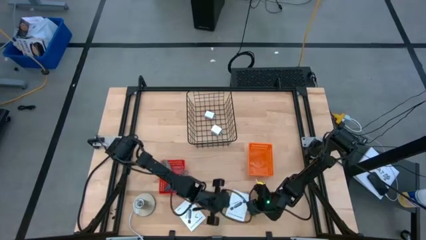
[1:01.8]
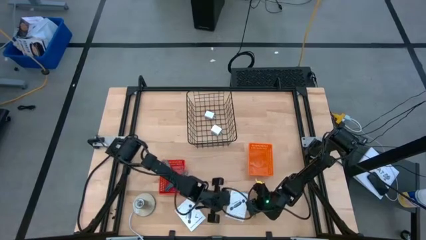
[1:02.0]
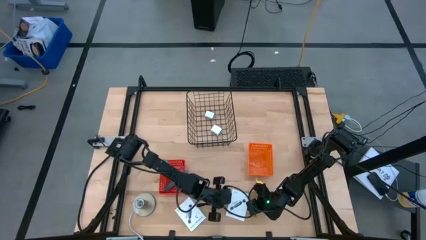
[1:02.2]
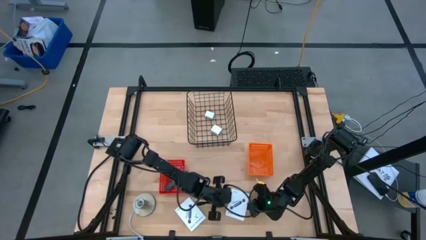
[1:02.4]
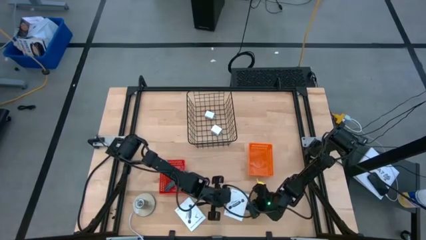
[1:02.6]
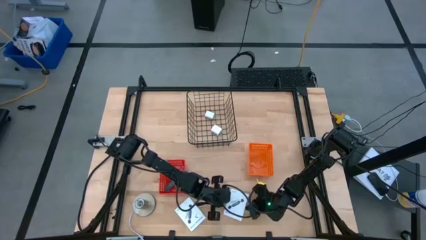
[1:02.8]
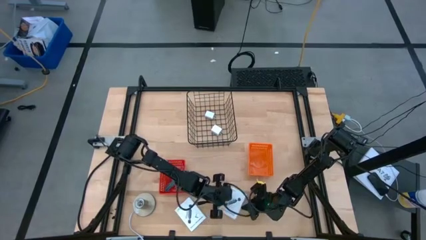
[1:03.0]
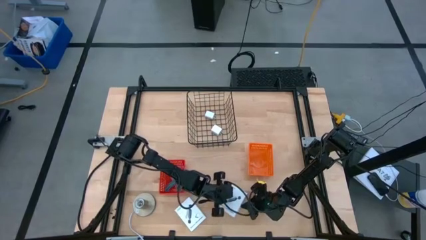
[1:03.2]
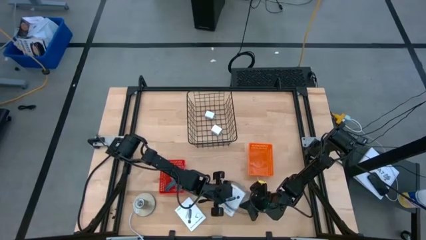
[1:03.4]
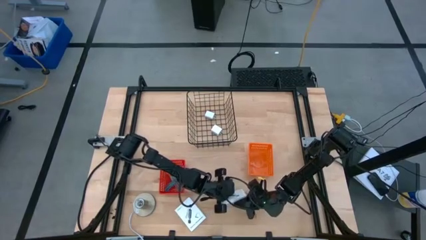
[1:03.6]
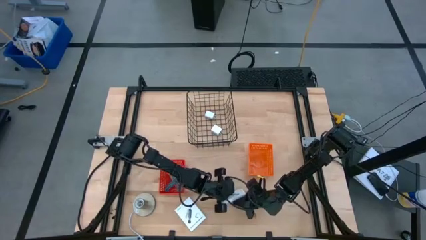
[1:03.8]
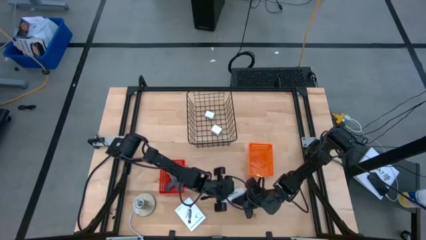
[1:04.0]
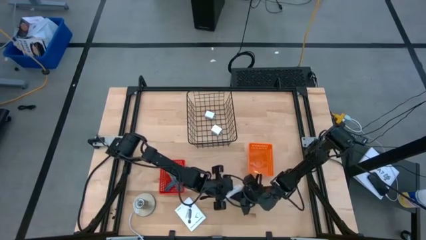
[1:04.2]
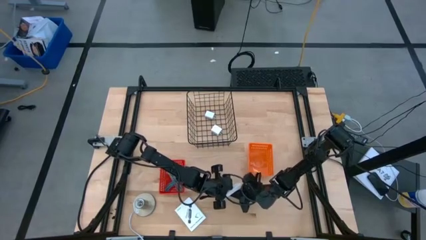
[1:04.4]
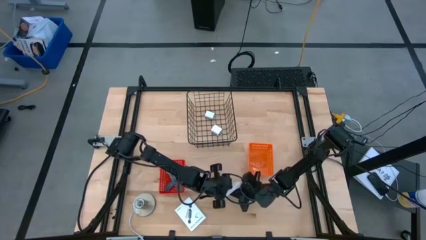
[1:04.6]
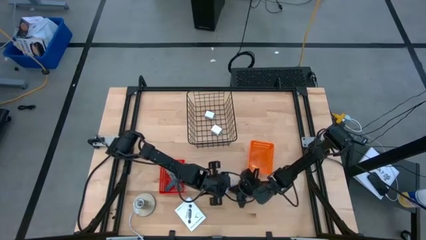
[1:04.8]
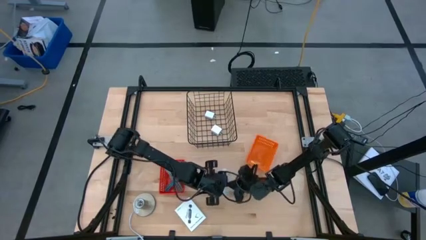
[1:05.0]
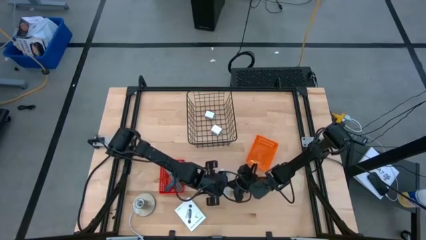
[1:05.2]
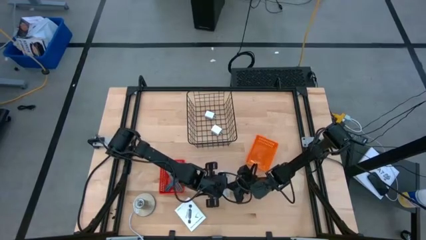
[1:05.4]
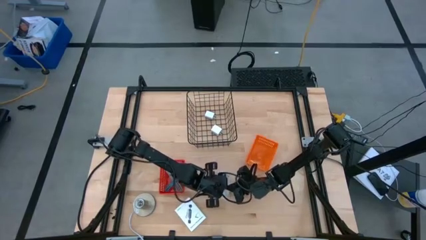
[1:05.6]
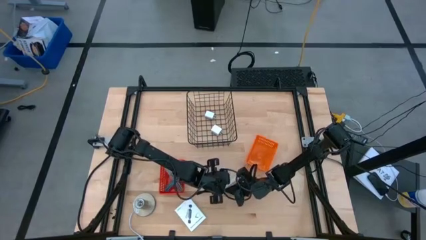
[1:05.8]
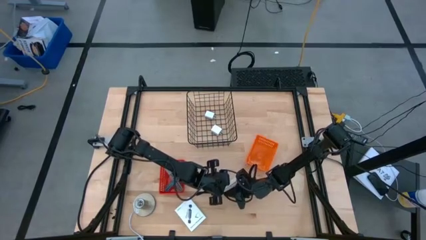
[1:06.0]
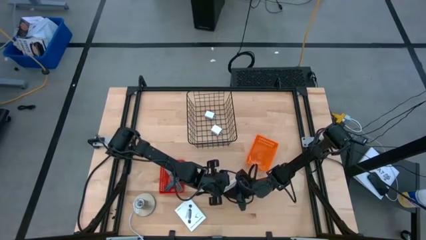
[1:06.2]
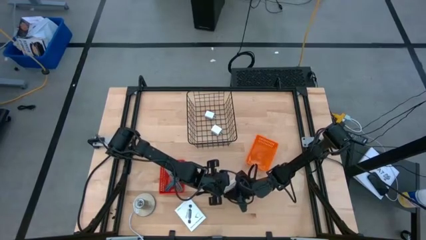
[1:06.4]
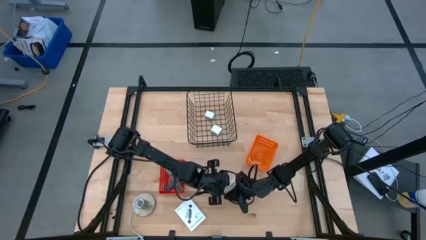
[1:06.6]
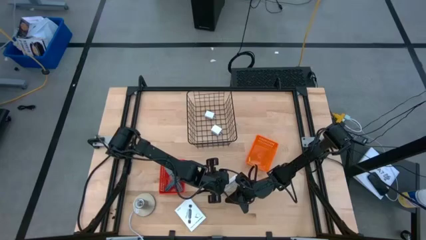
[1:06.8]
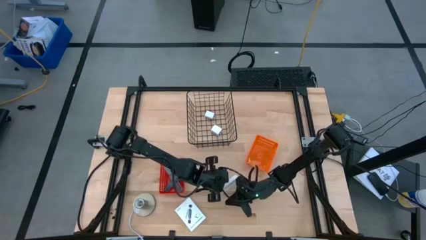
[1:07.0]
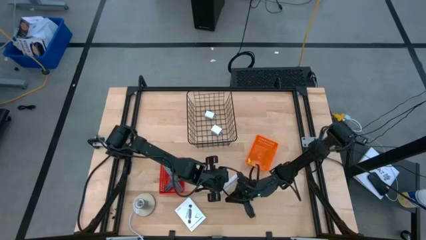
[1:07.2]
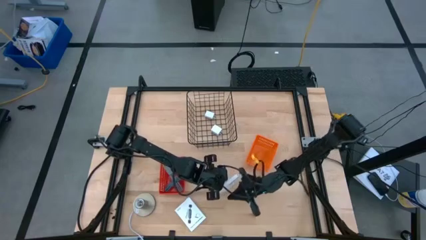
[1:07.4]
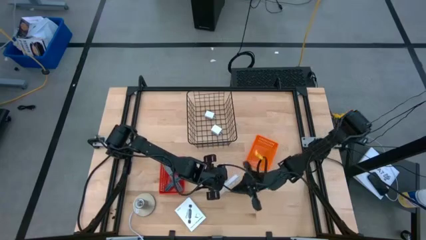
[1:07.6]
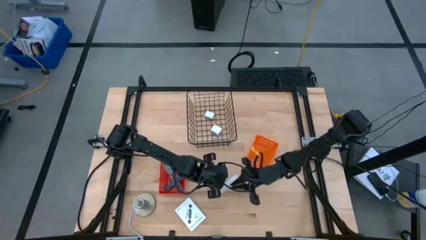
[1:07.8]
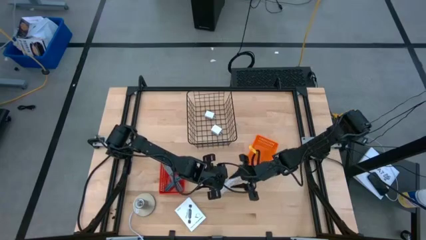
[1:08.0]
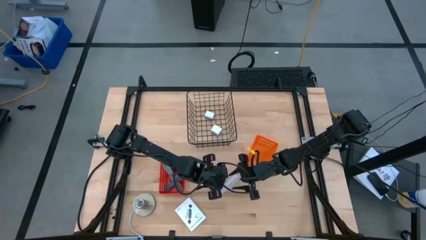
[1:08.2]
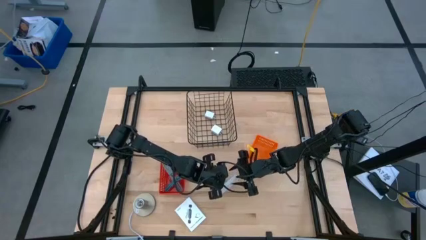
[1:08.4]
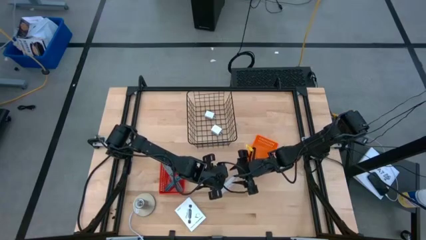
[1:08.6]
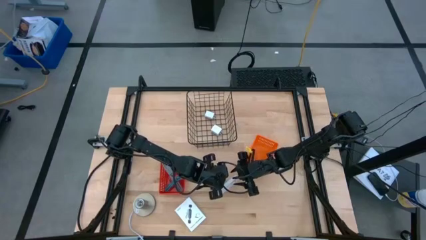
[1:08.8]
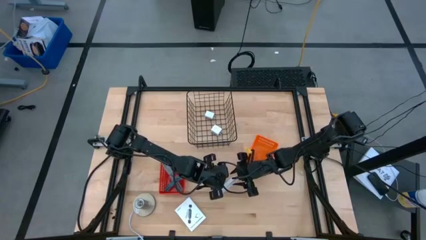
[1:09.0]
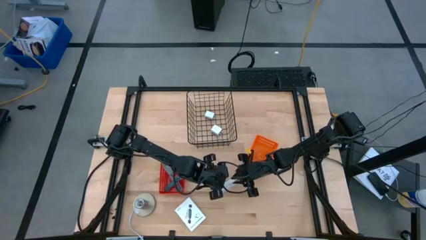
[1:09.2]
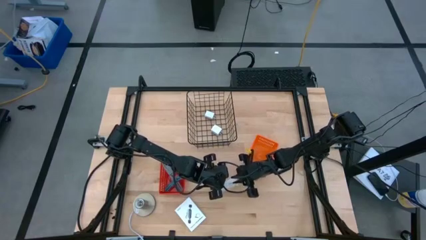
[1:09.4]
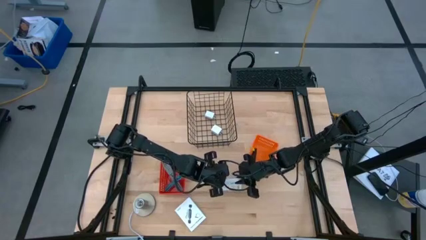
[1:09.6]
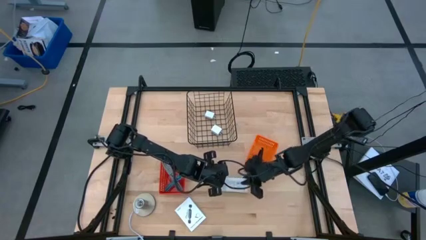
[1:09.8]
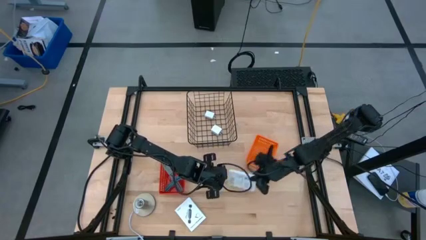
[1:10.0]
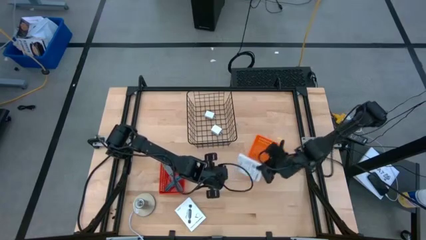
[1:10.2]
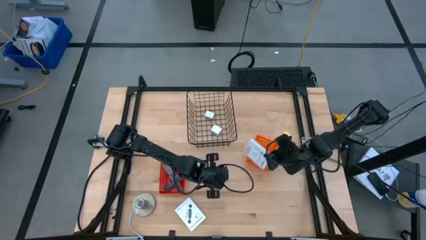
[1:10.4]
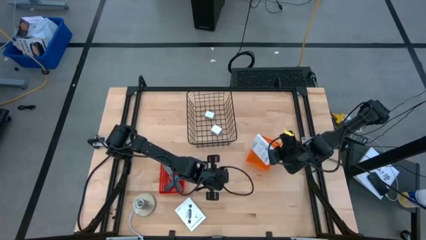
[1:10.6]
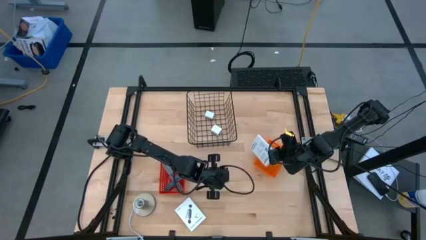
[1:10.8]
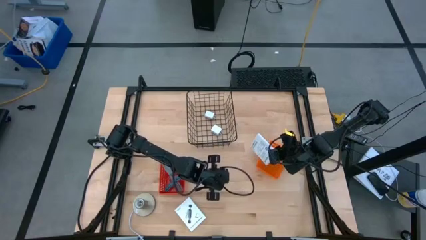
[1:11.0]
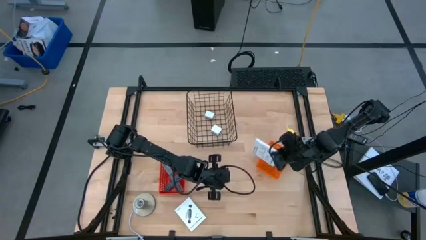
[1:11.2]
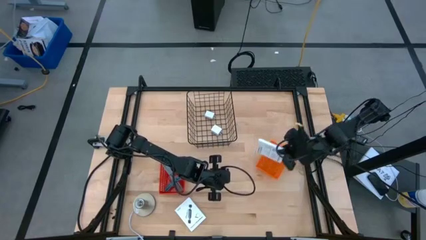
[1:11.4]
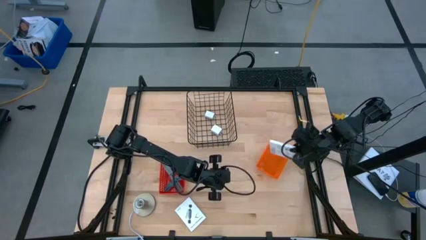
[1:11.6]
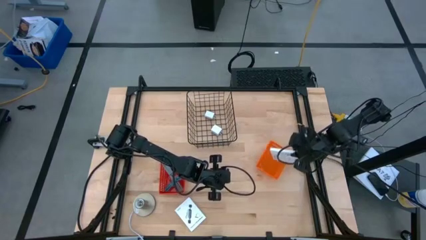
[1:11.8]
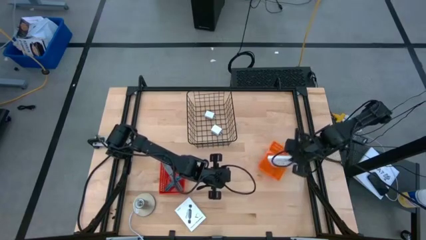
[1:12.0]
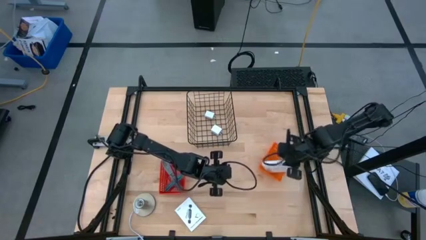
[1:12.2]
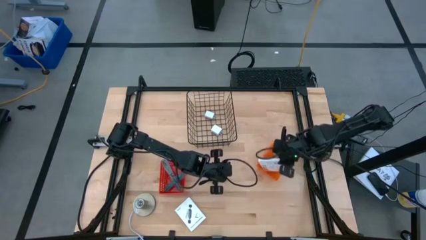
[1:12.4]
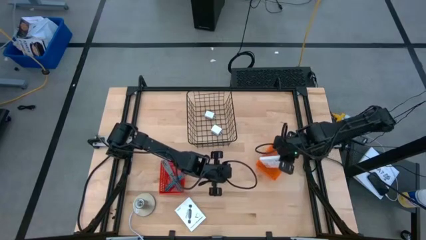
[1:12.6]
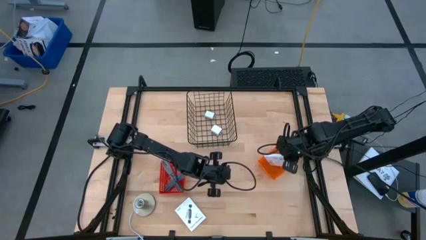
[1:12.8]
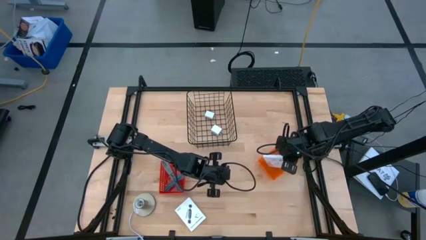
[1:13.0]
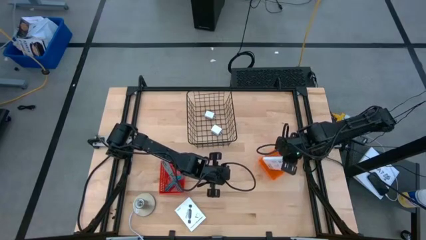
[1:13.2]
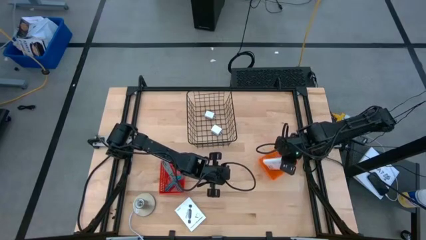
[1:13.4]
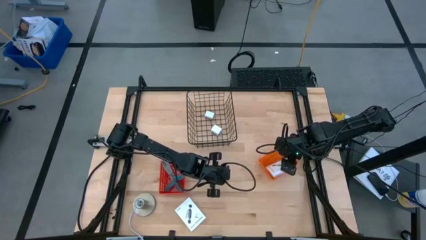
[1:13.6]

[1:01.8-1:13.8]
Task: Pick and place items into bin
Put the top white card reader box into the orange bin
